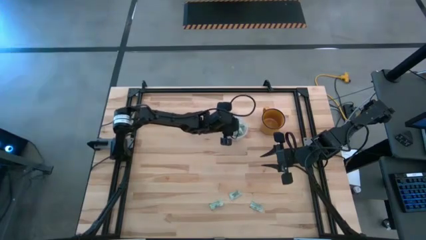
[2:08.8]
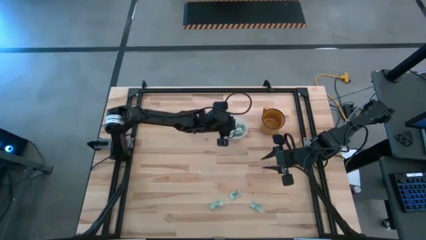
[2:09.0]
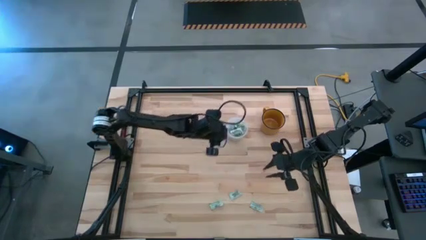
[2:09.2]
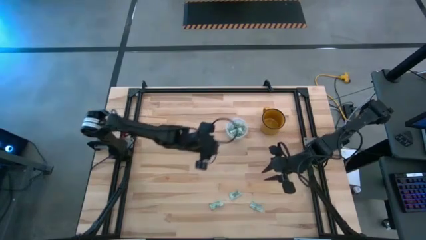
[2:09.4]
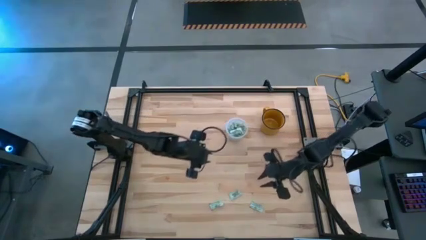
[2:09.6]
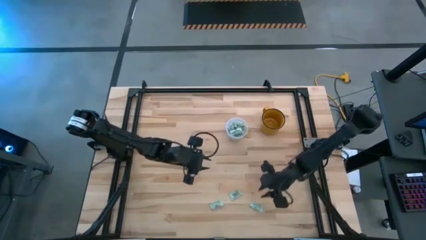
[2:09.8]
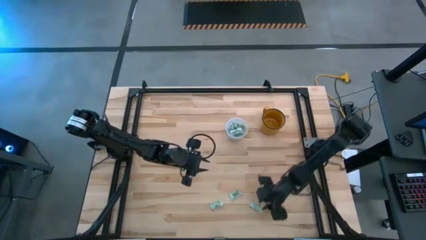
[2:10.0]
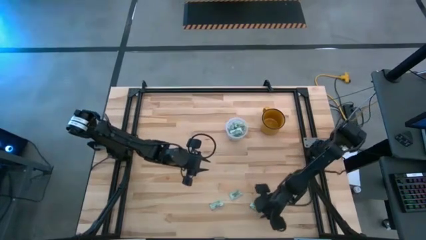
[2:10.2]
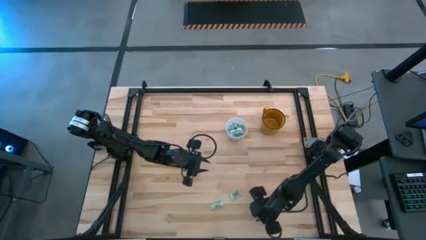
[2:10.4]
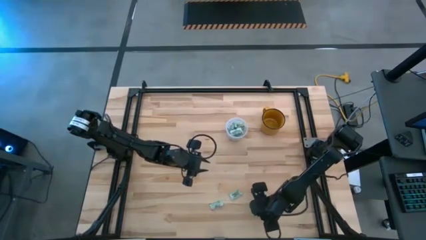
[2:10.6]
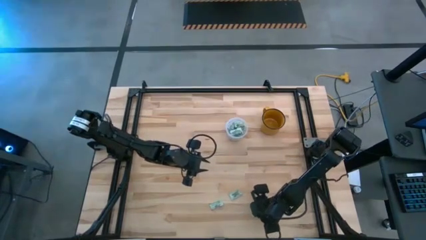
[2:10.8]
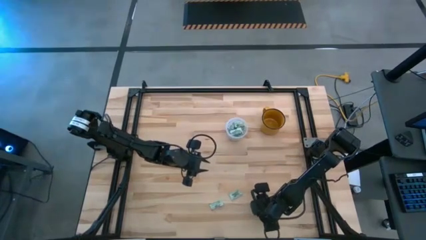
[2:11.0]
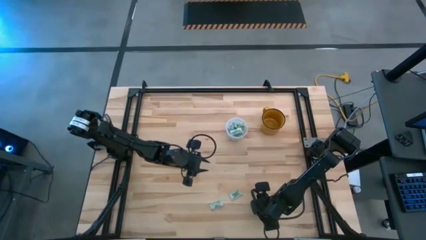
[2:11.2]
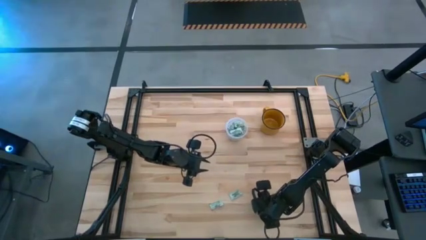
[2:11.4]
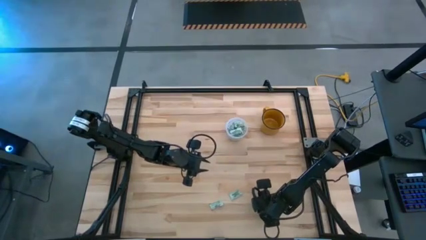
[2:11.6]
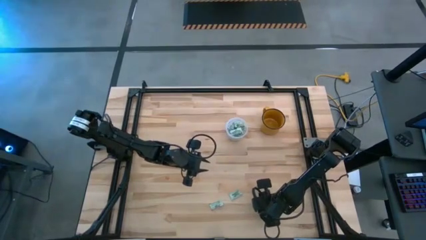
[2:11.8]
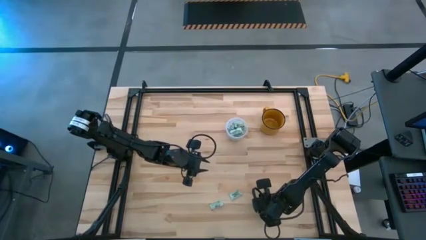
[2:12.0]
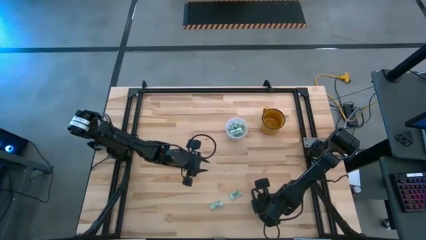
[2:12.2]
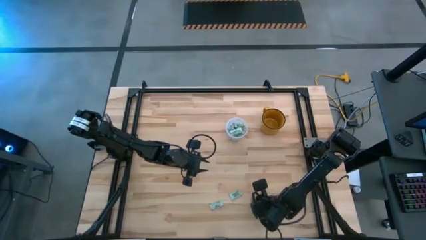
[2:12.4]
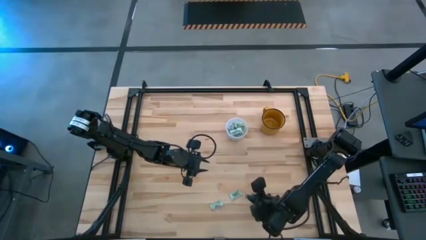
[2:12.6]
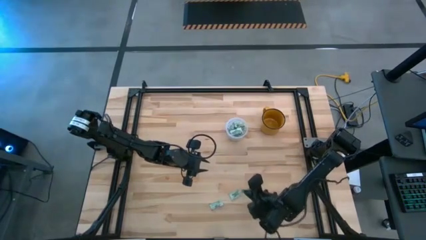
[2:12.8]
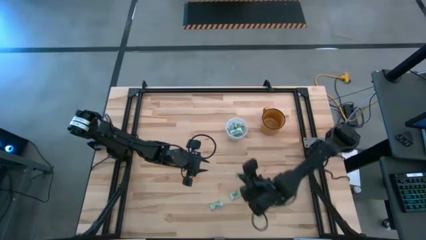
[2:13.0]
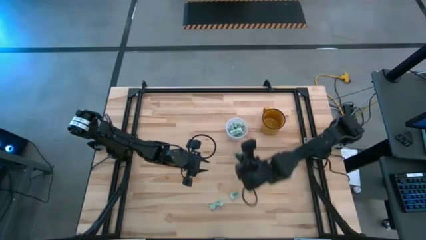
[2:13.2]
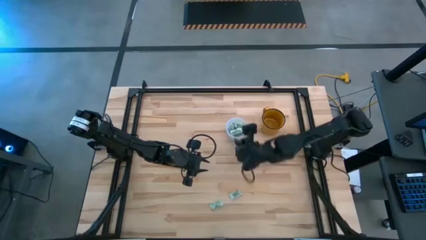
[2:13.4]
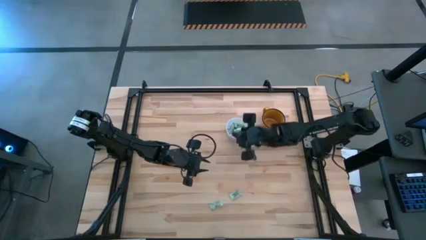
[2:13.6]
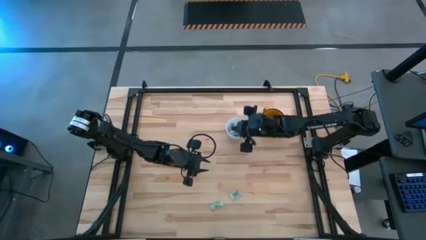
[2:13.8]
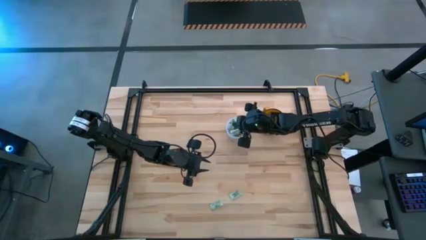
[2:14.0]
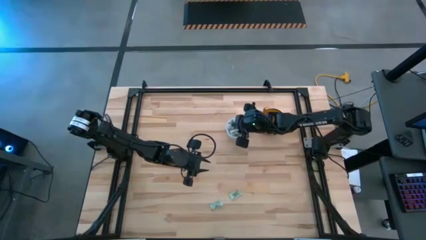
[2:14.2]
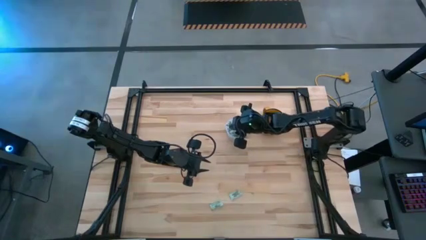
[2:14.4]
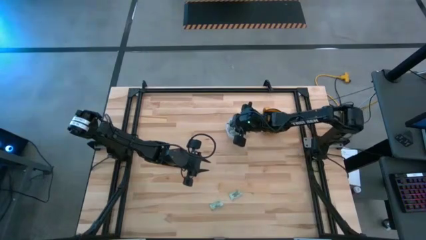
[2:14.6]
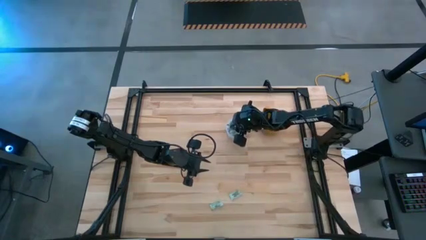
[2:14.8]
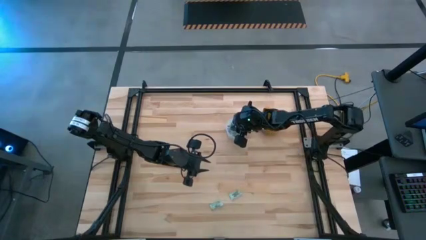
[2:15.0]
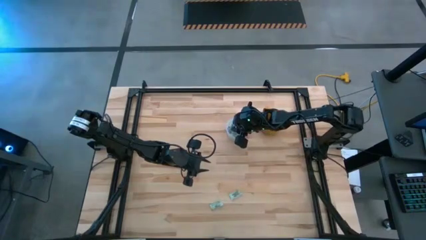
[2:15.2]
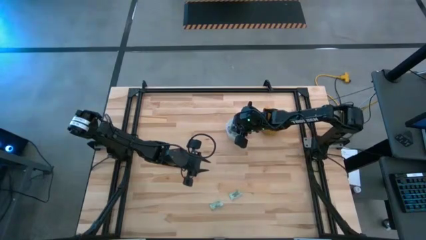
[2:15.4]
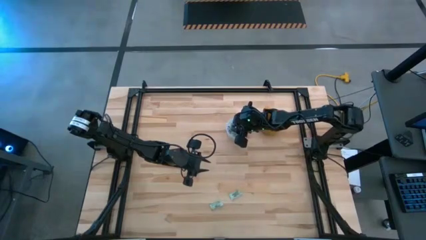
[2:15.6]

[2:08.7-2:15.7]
Task: Pick and place Stevia / Truvia into bins
Put the bottom right green stevia packet into the transparent bin

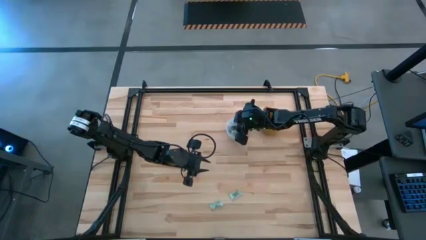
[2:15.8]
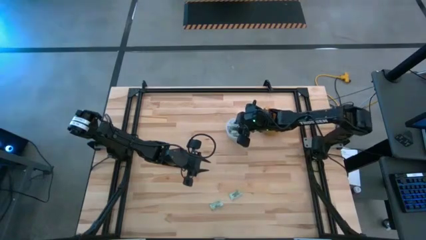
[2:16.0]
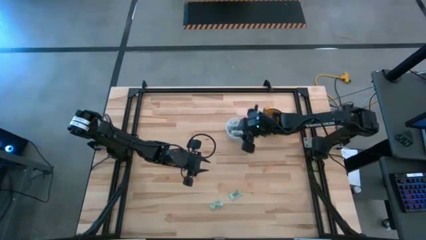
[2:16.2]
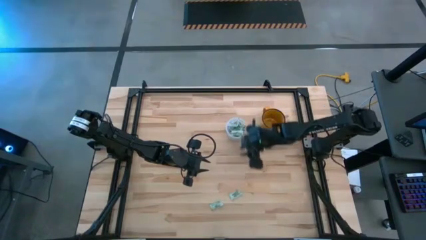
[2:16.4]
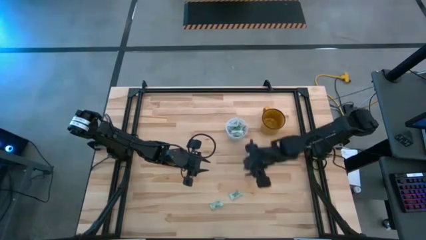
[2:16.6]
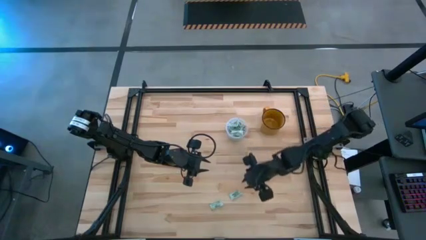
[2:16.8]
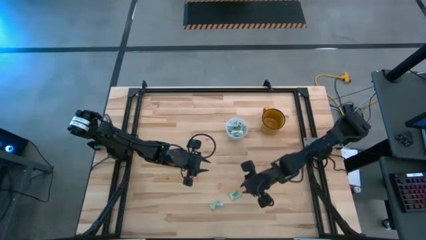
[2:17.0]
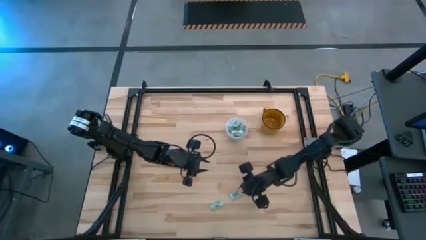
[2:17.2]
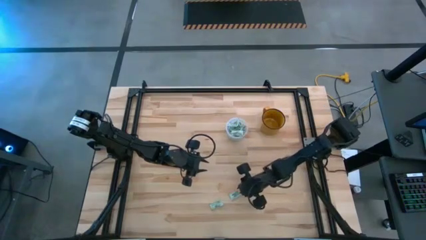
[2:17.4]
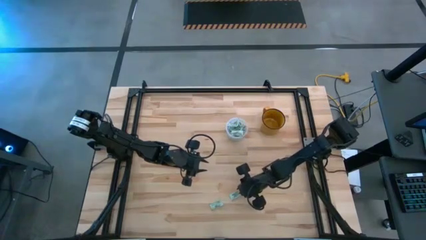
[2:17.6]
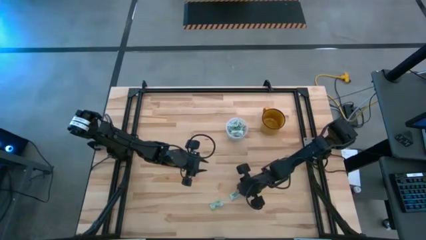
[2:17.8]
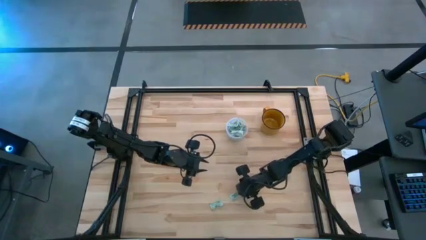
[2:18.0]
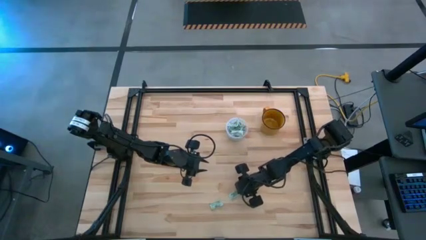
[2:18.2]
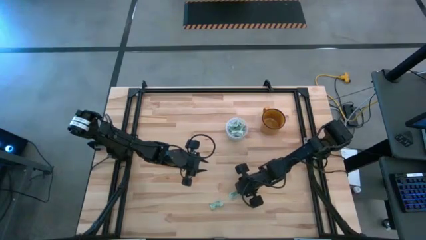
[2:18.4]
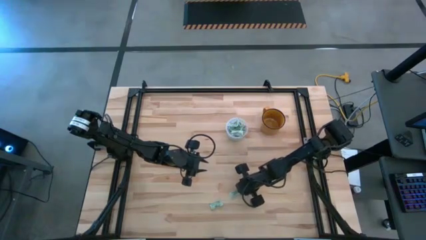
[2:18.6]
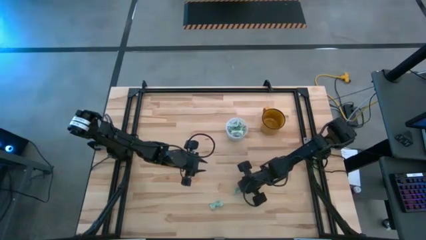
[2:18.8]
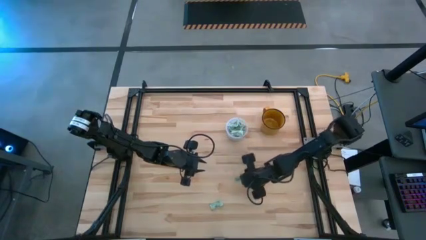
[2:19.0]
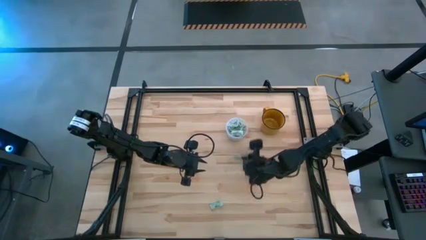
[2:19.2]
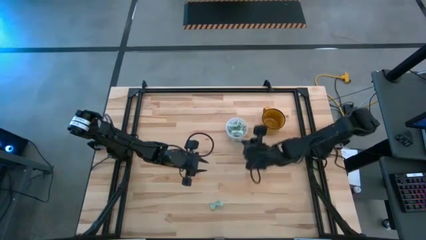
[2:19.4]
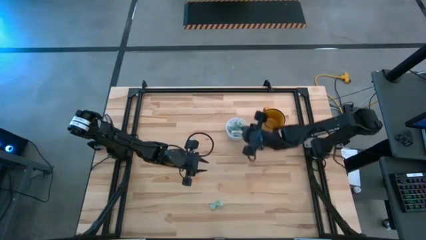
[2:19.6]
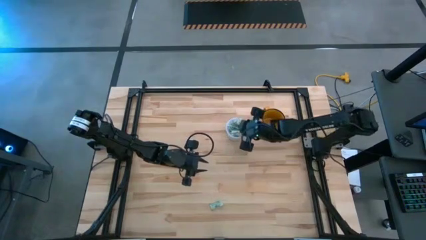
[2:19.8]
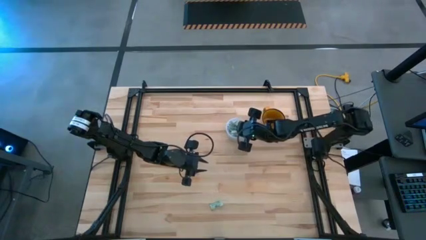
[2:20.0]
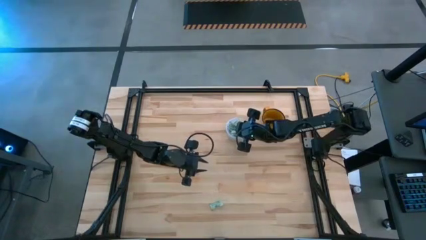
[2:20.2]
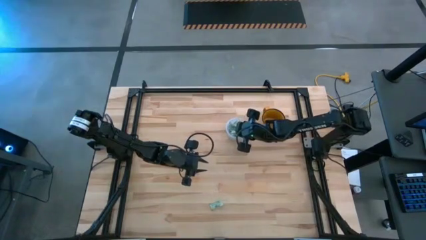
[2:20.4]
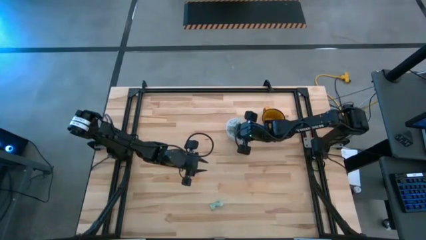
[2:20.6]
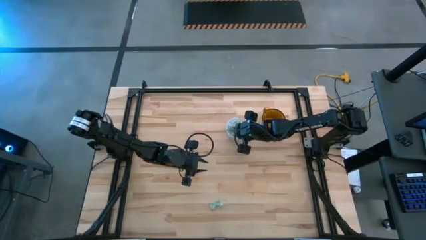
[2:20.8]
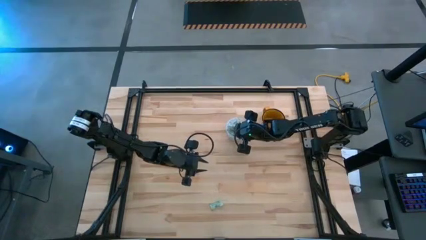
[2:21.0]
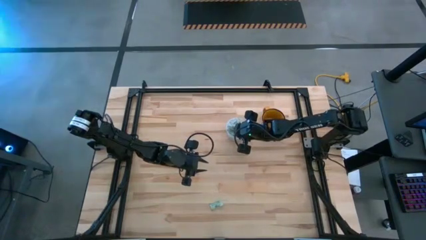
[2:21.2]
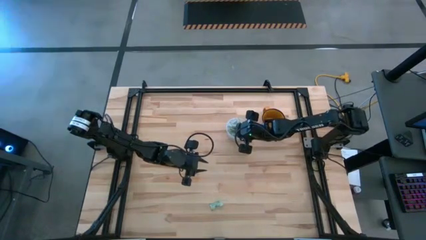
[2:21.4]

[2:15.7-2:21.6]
Put the top green stevia packet into the transparent bin

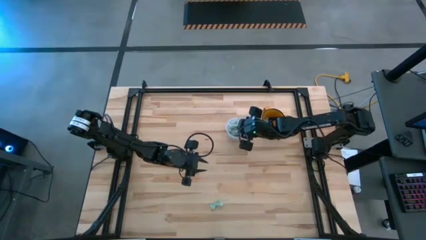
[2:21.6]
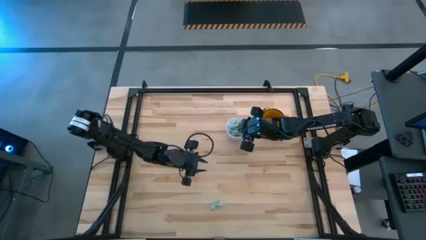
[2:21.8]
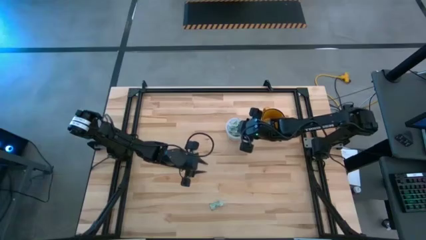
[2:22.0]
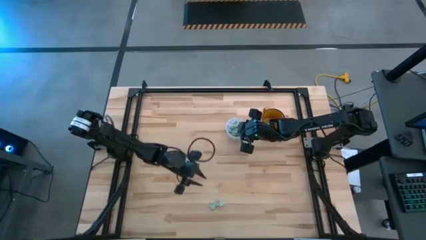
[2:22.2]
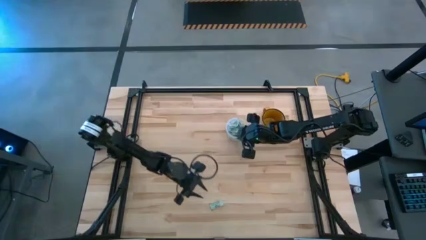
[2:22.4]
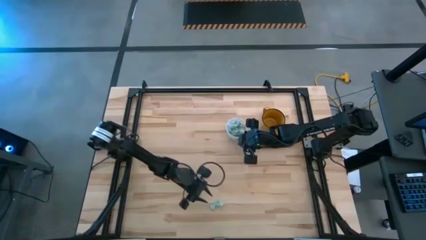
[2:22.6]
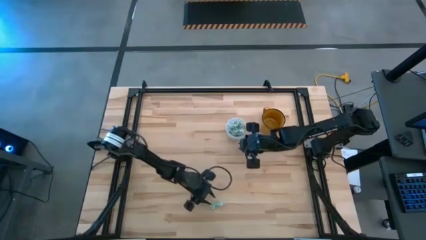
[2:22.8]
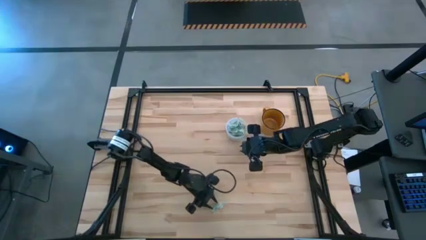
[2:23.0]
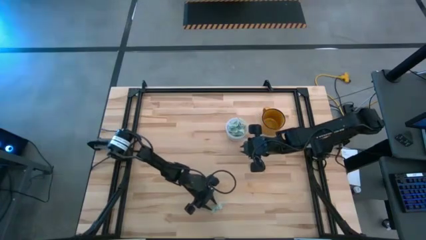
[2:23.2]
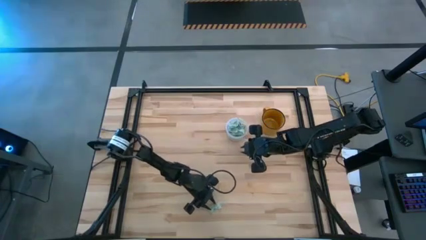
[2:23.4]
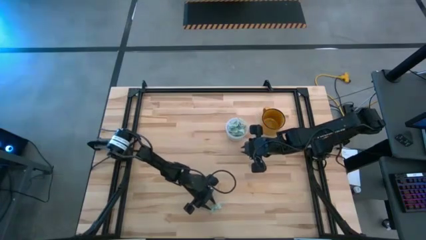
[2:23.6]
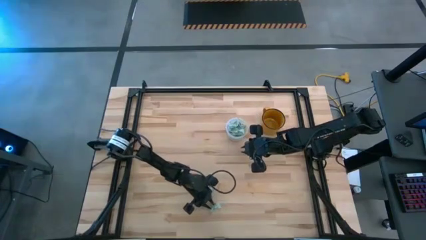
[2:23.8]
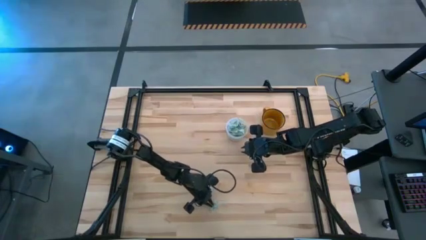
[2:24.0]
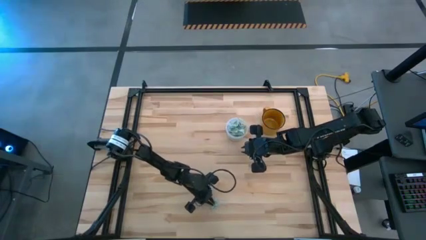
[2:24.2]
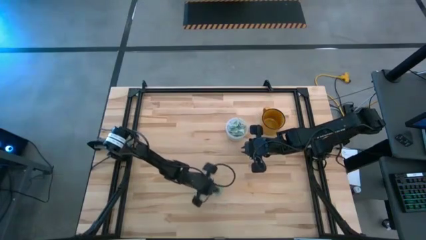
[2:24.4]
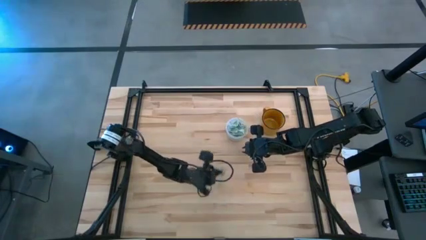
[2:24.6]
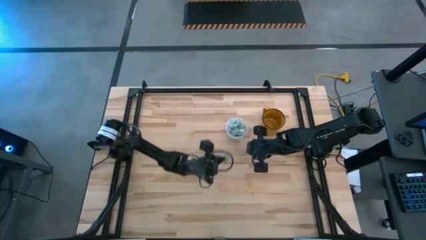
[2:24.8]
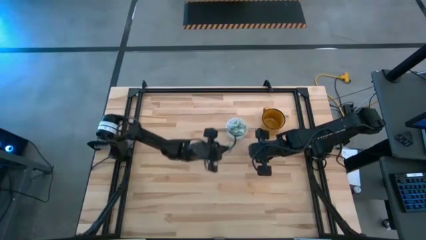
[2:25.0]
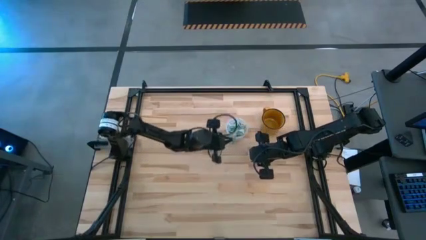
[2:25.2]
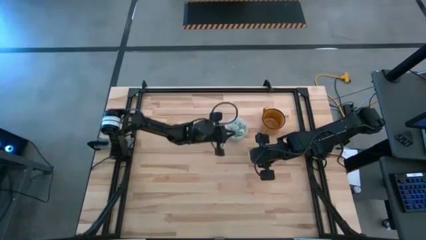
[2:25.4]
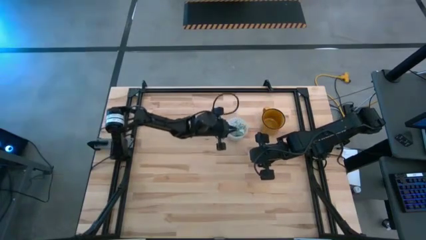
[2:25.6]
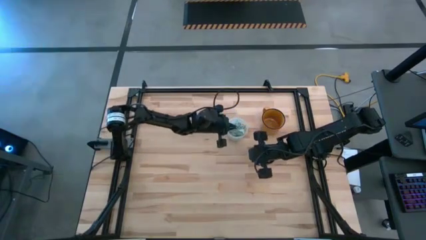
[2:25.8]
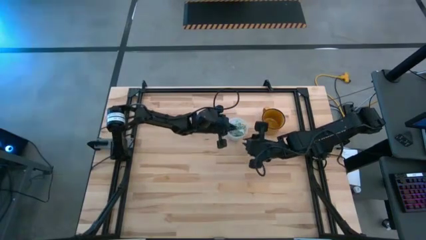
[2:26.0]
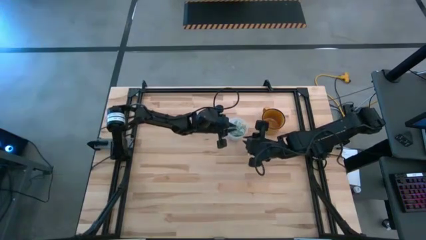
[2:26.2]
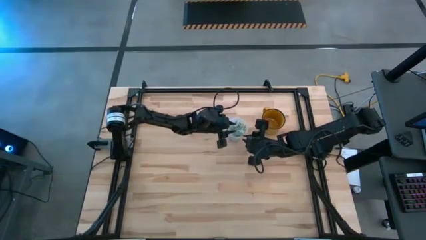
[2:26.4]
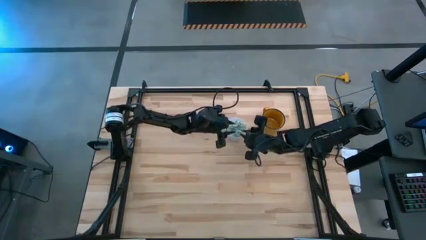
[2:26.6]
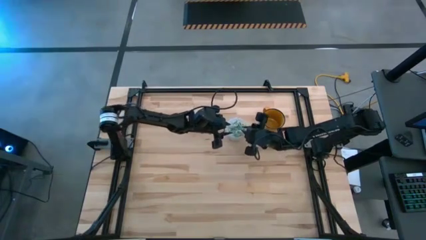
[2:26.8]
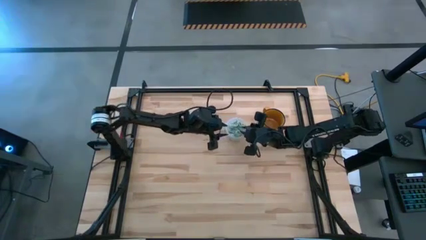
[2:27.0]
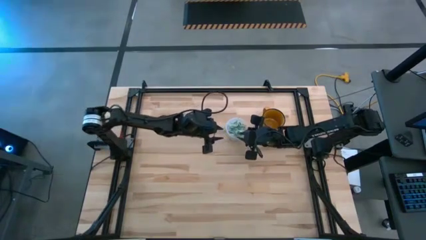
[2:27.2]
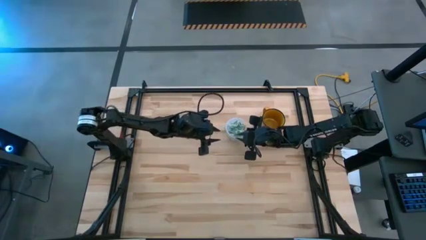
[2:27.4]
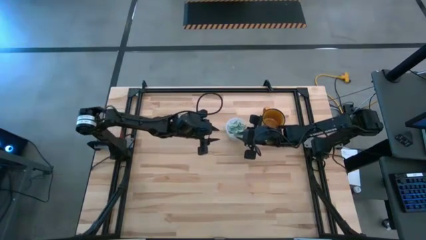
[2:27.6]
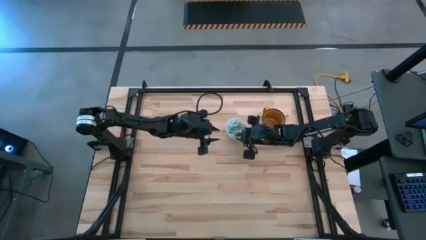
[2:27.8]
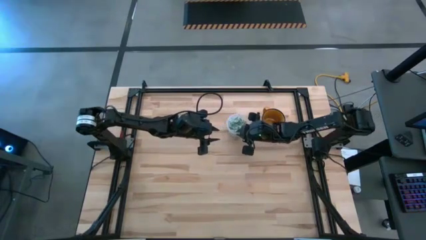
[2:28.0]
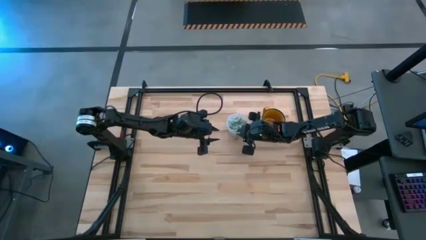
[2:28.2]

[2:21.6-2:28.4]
Put the green stevia packet into the transparent bin
